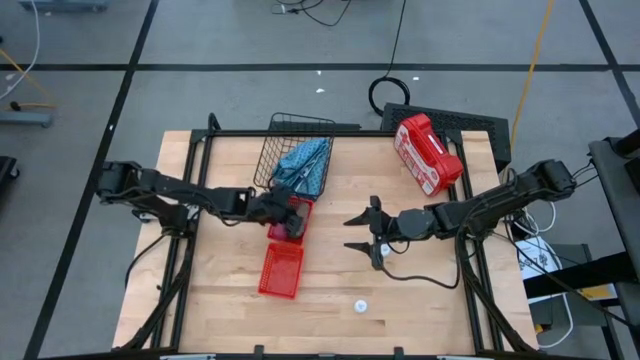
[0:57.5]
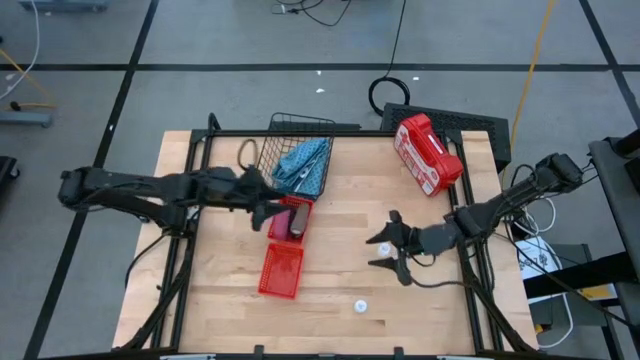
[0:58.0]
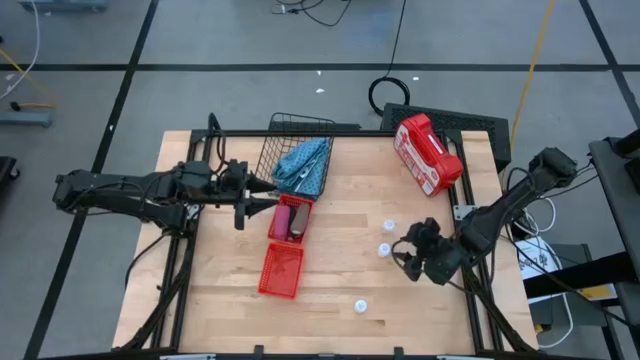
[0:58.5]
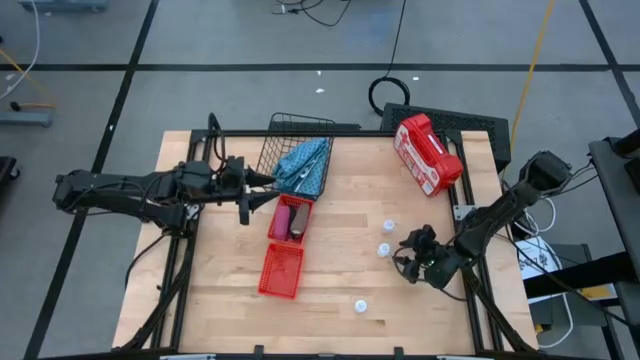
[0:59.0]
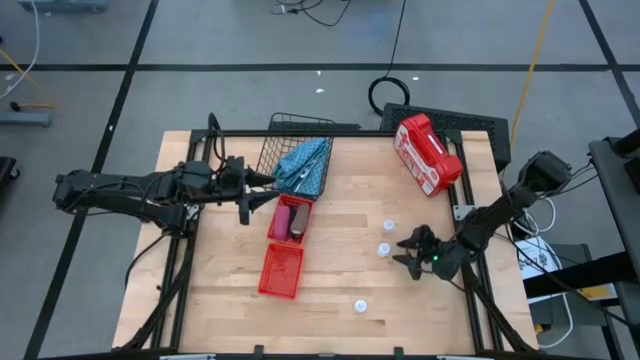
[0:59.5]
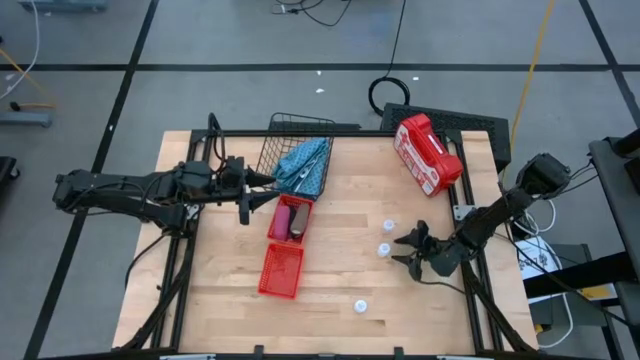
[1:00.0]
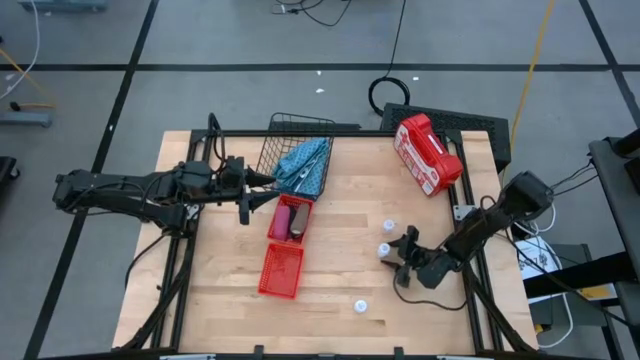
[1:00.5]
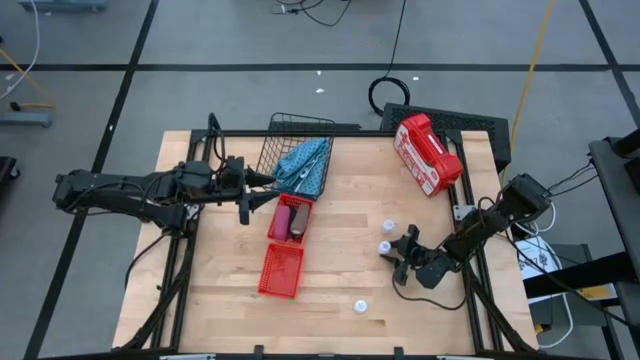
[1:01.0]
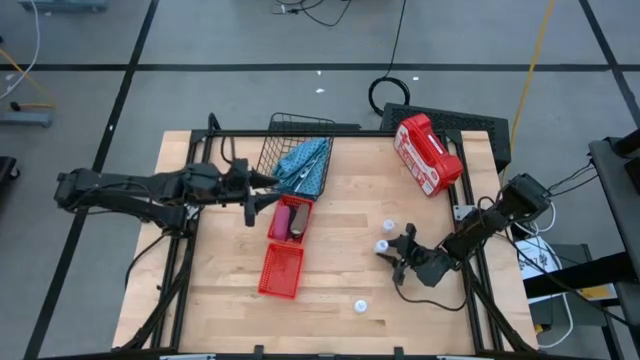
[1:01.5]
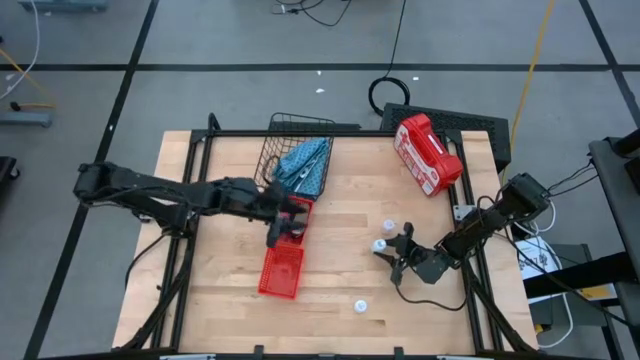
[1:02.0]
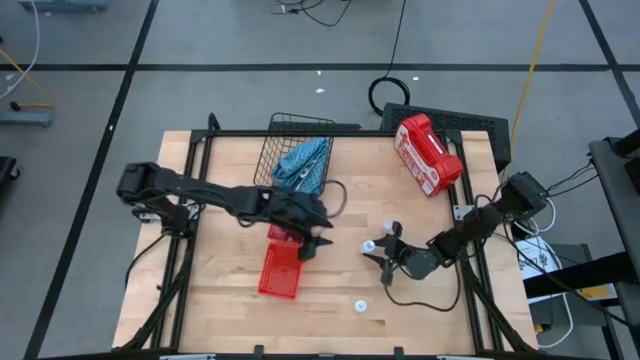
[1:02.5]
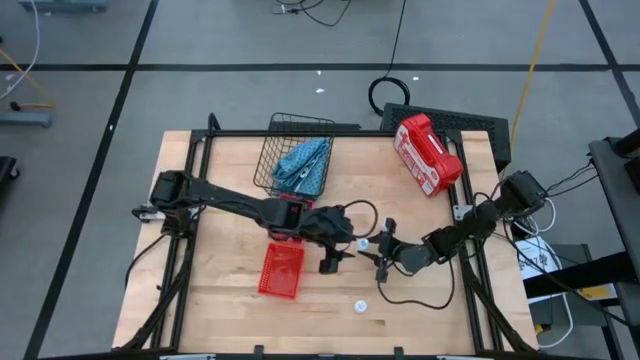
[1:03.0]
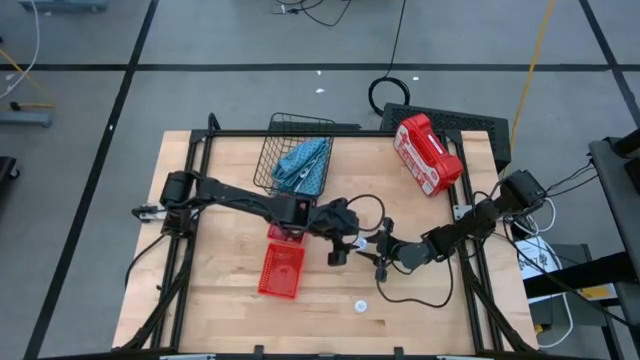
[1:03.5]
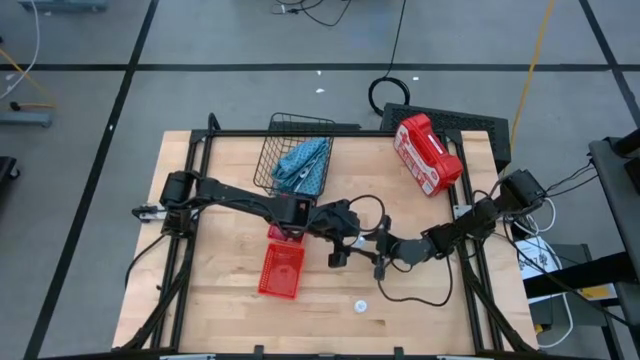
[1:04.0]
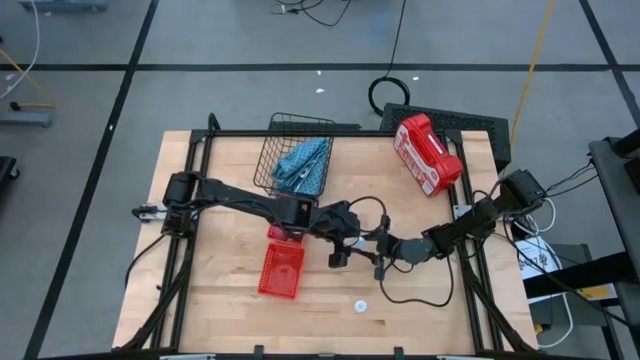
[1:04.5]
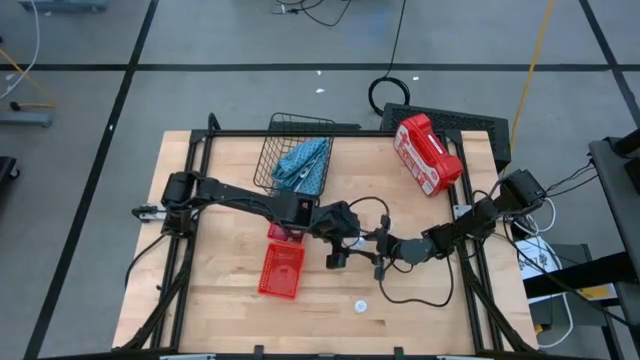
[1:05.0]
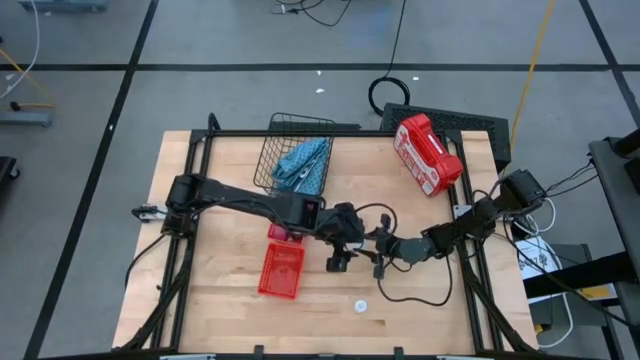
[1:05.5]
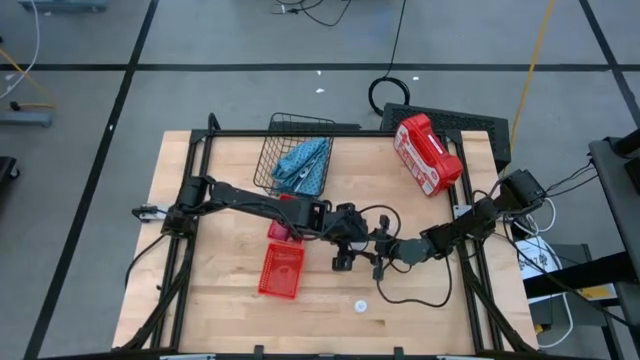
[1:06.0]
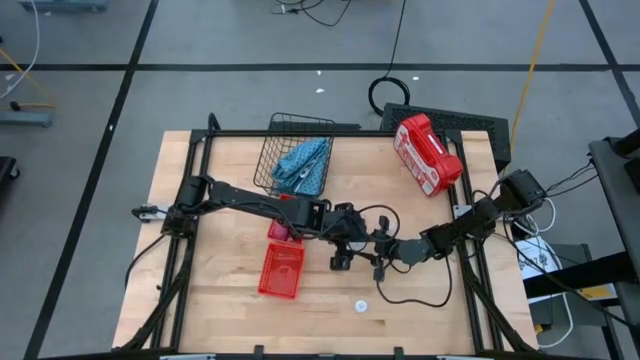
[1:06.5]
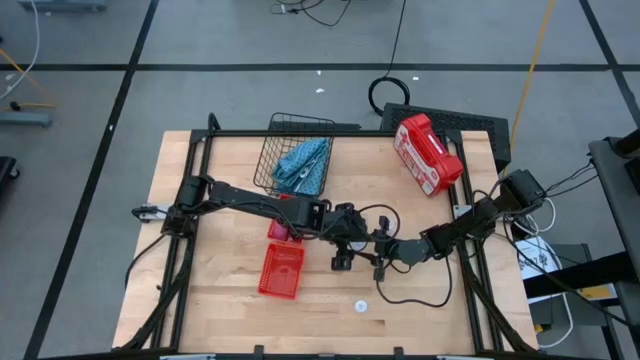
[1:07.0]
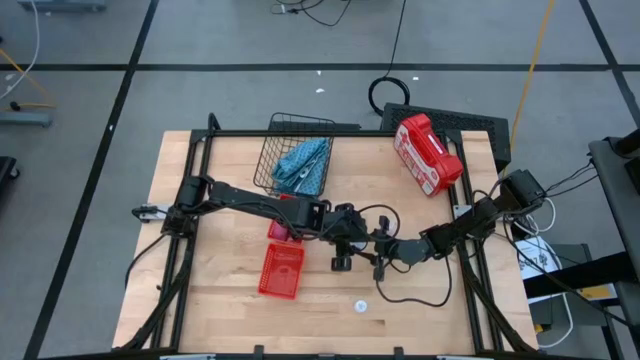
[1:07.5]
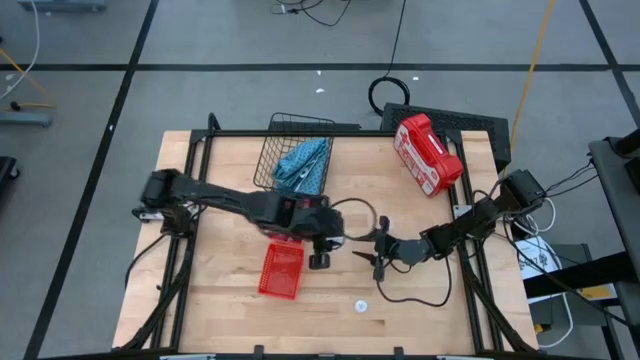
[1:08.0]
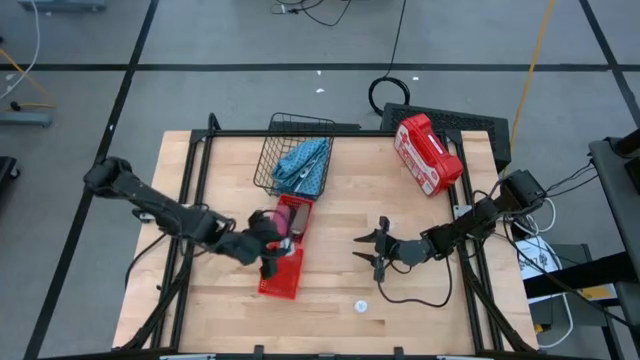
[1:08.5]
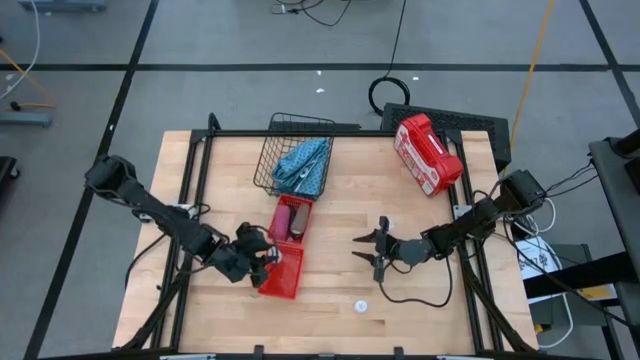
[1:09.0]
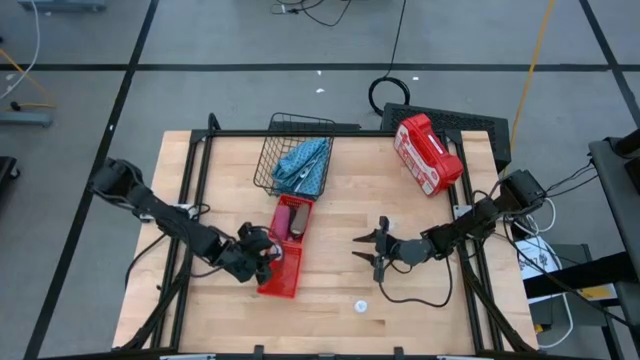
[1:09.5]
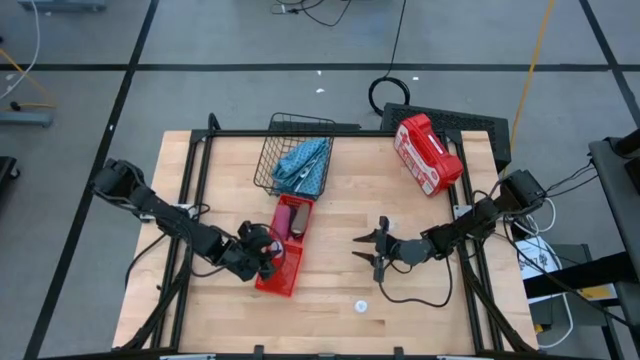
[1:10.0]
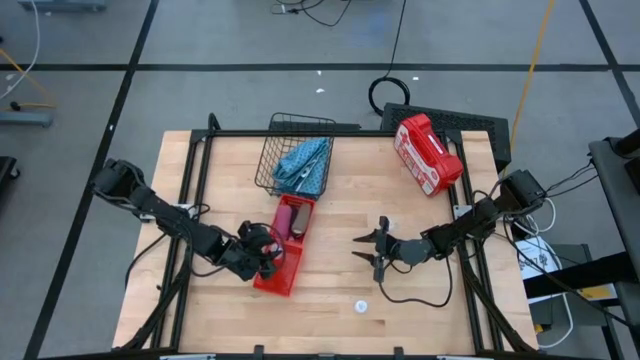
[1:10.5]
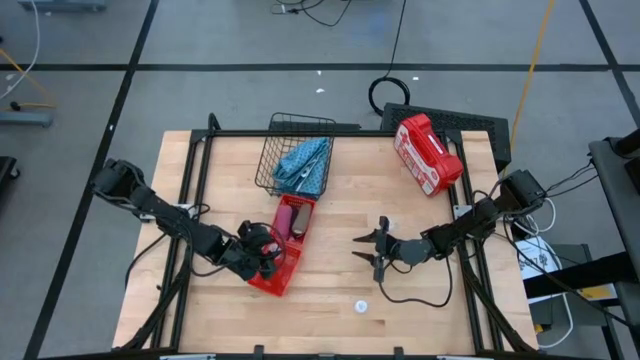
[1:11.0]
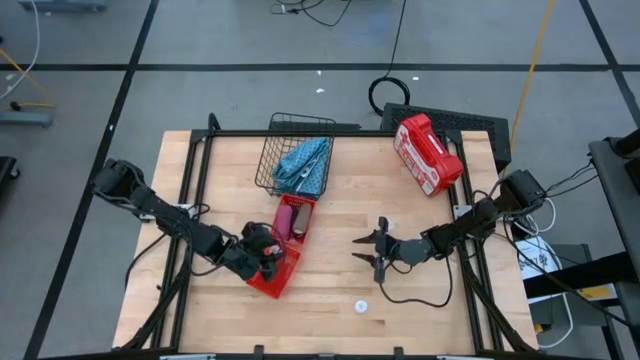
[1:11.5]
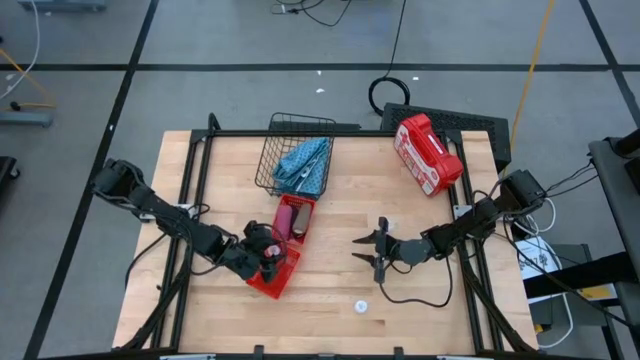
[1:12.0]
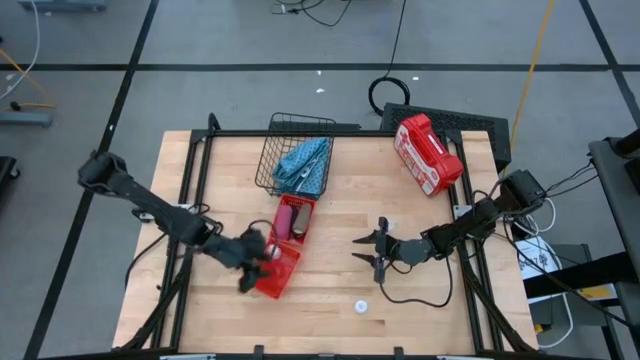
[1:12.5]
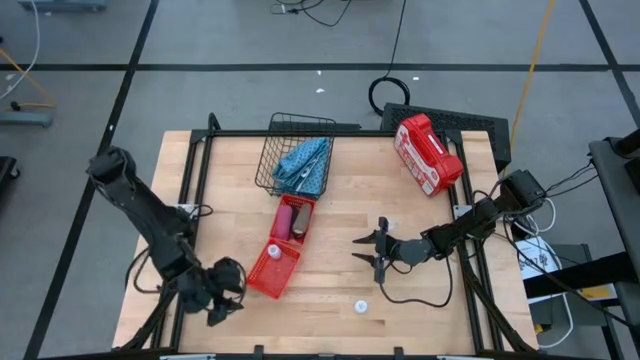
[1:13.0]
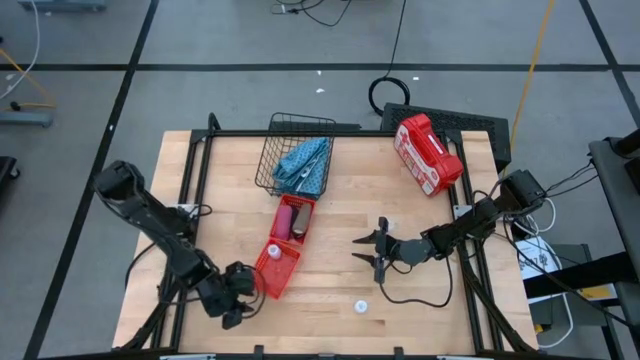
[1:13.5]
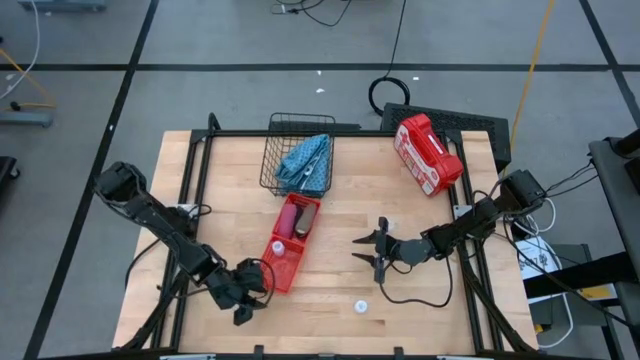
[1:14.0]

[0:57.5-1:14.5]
Task: Pick & place medical supplies in basket/bin
Put the top white pill bottle into the bottom red bin

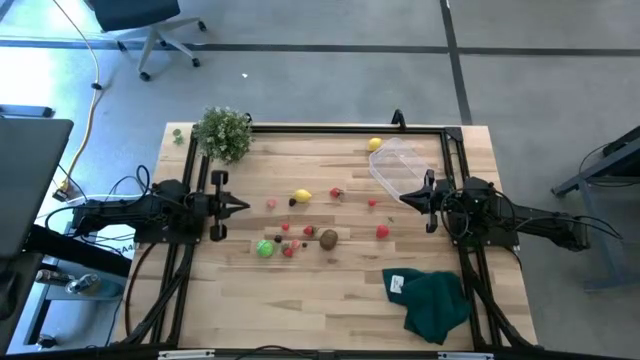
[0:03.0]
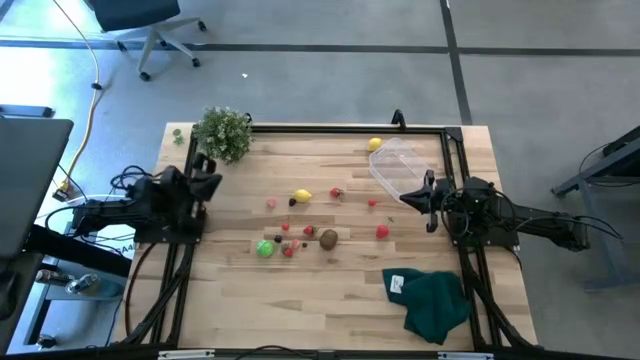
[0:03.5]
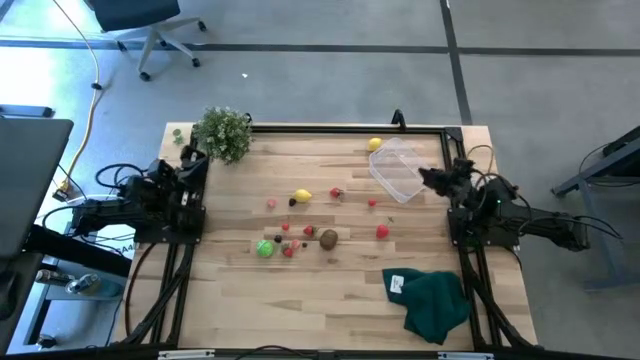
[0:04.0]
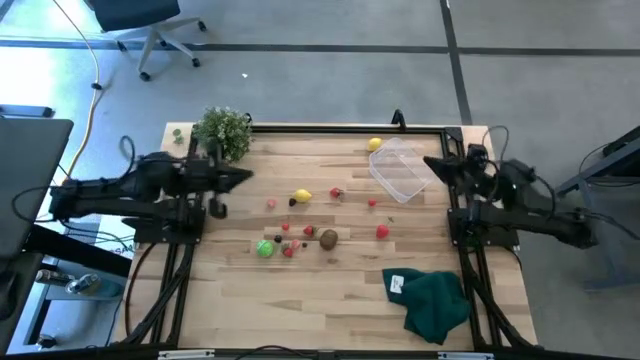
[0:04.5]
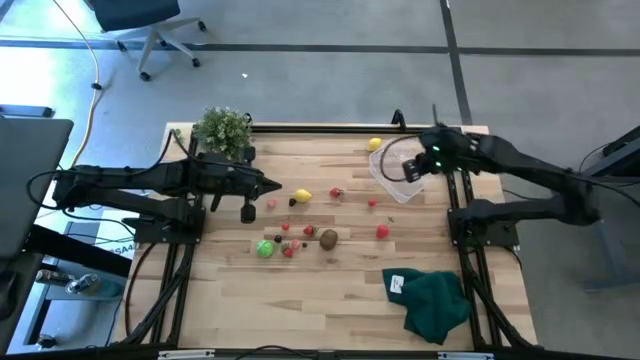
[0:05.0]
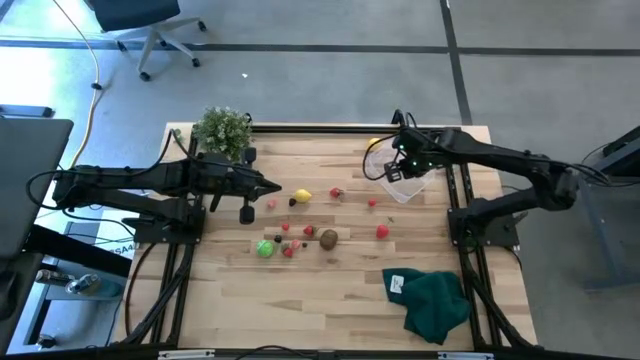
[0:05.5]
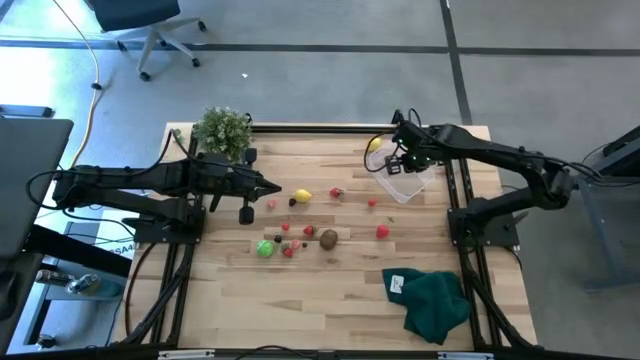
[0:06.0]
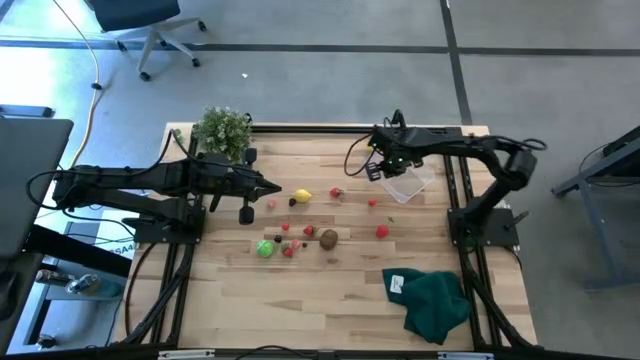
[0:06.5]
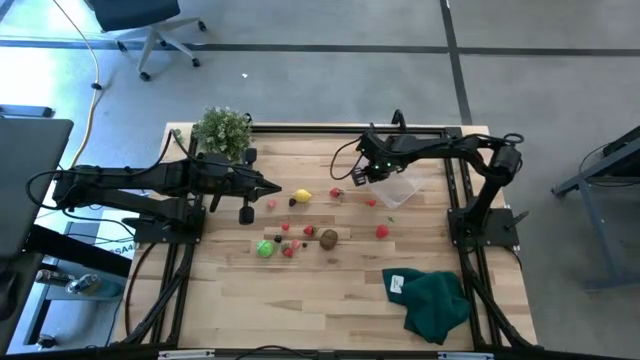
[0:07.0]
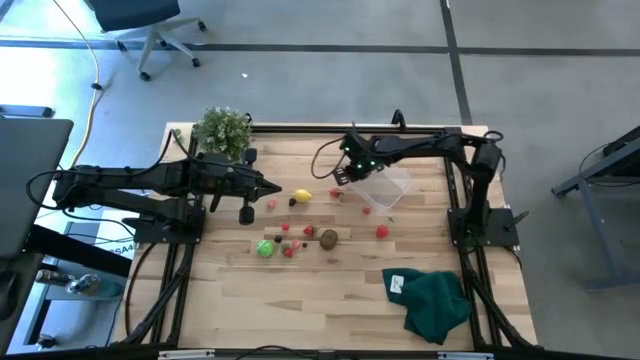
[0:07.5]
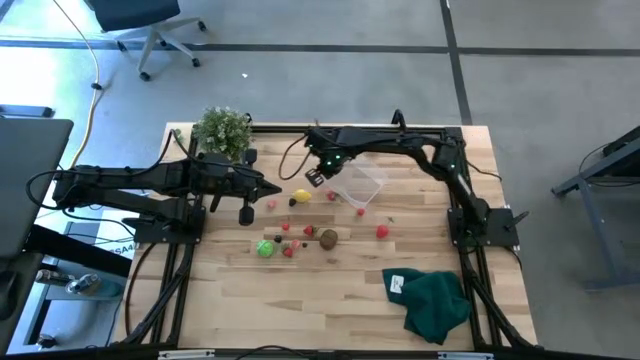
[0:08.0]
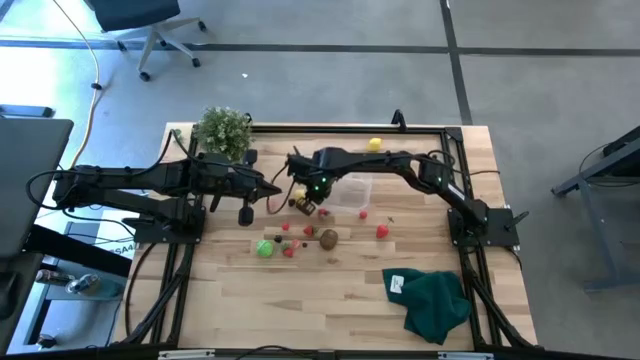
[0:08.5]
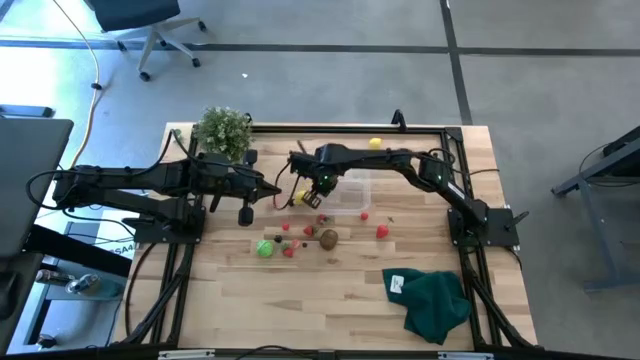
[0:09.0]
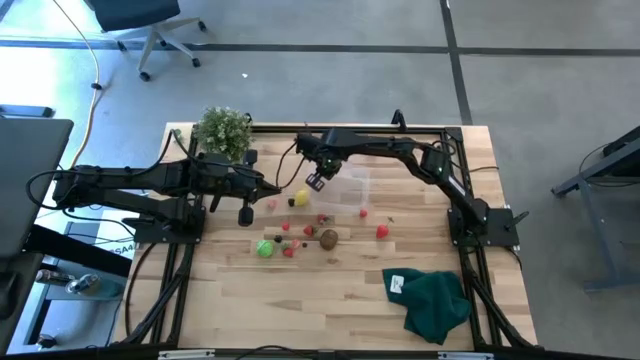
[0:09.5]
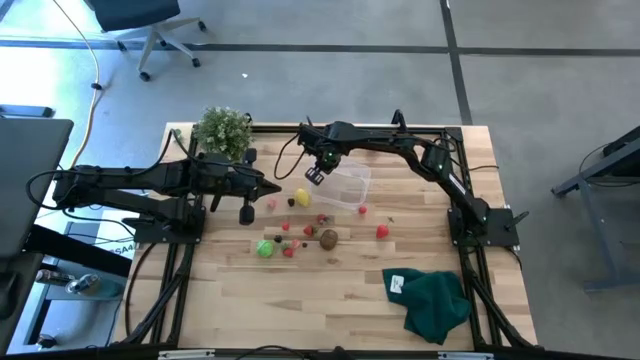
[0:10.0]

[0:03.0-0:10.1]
Task: Pick and placing Produce into tupperware
Move the transparent bin to the center of the table
